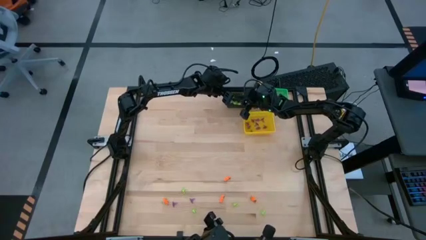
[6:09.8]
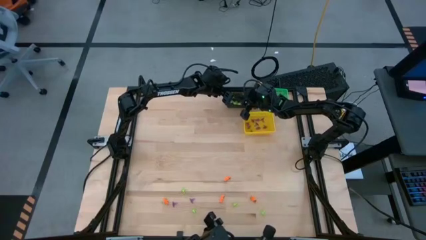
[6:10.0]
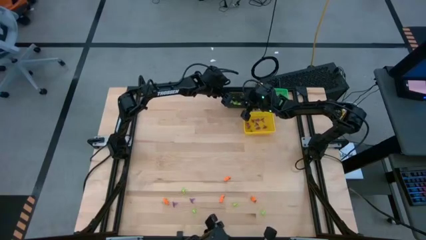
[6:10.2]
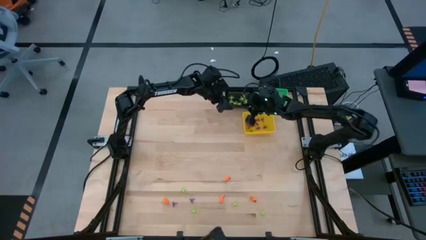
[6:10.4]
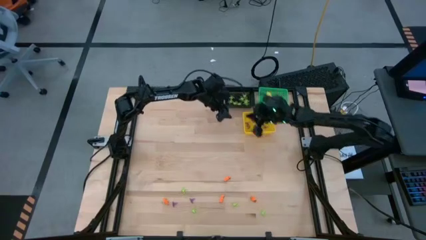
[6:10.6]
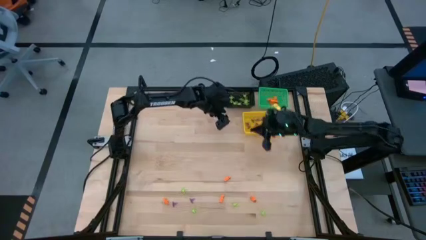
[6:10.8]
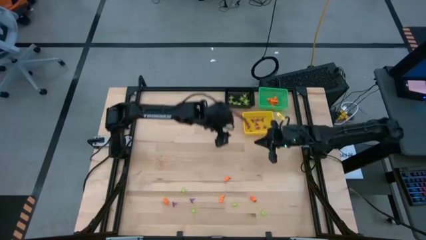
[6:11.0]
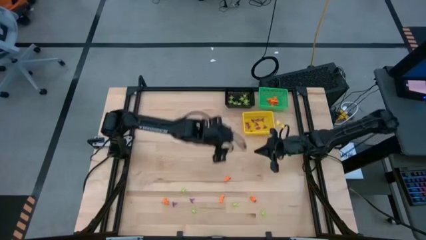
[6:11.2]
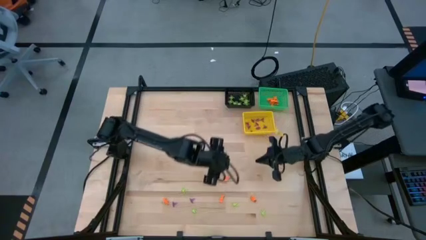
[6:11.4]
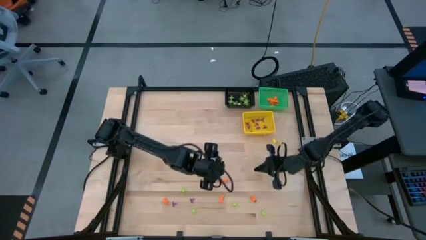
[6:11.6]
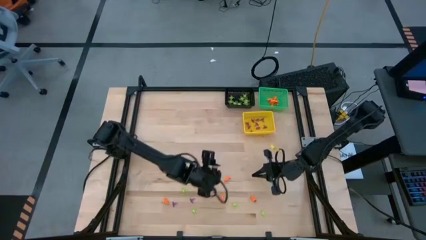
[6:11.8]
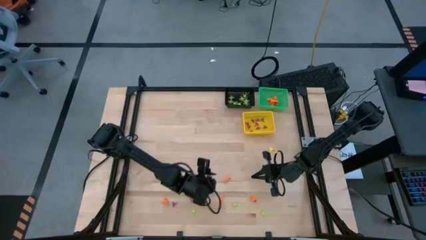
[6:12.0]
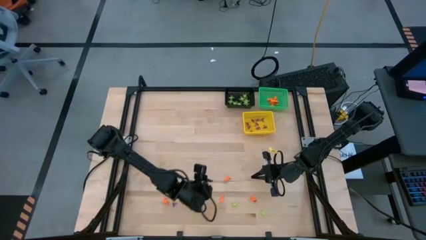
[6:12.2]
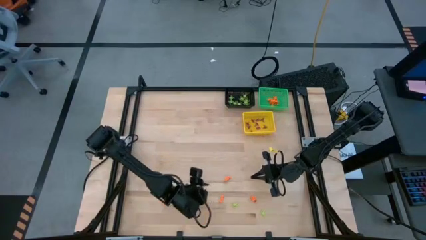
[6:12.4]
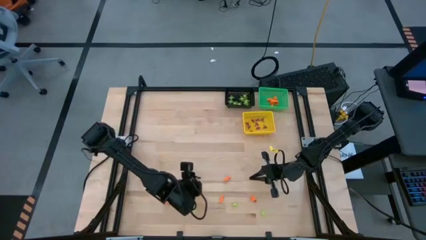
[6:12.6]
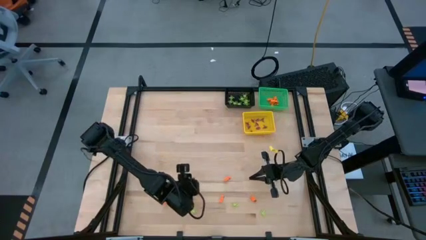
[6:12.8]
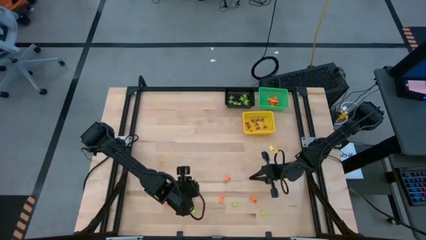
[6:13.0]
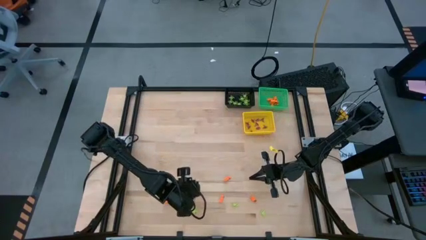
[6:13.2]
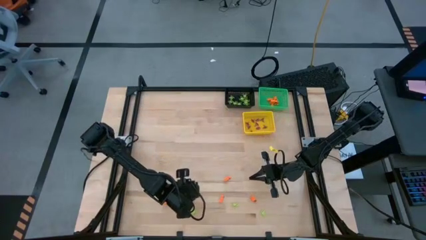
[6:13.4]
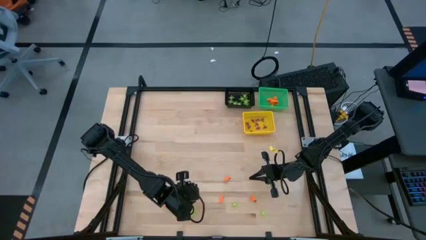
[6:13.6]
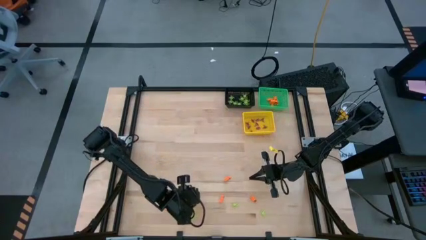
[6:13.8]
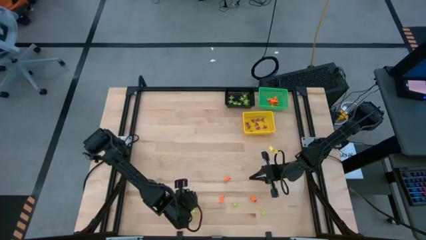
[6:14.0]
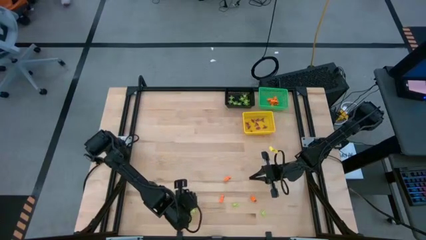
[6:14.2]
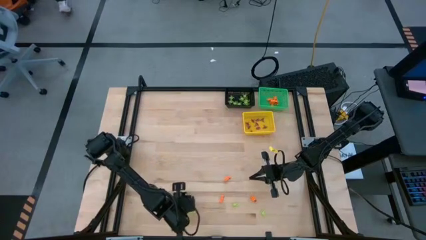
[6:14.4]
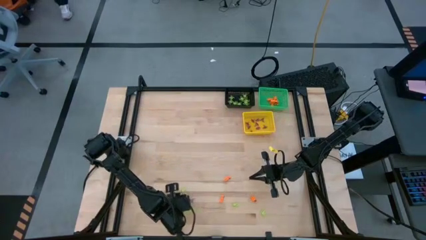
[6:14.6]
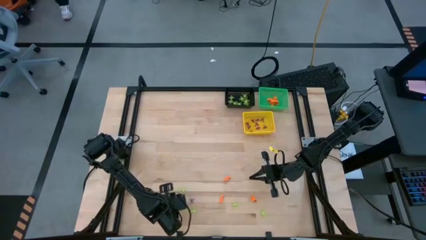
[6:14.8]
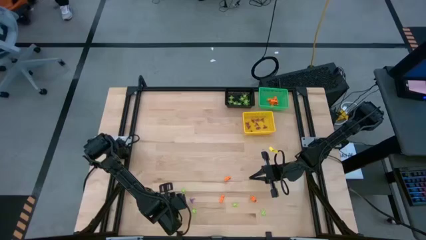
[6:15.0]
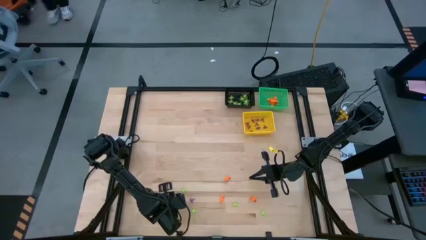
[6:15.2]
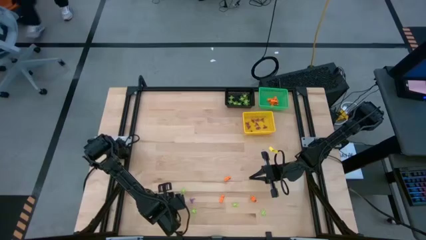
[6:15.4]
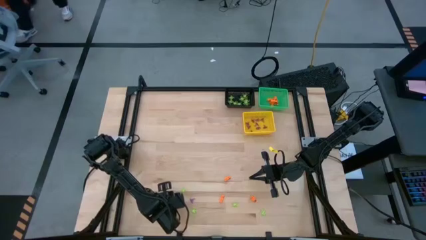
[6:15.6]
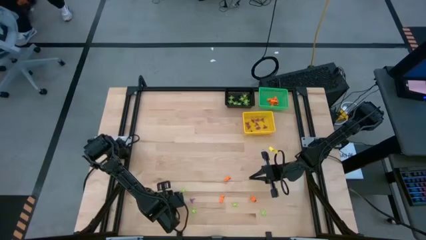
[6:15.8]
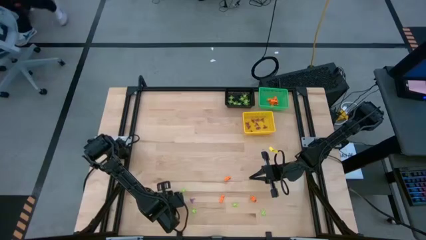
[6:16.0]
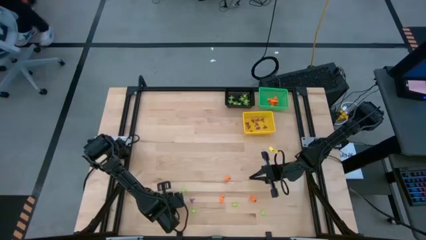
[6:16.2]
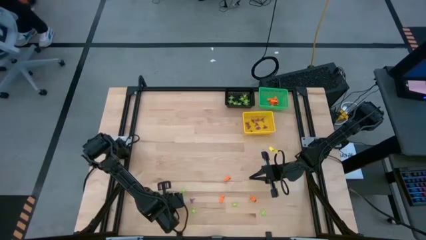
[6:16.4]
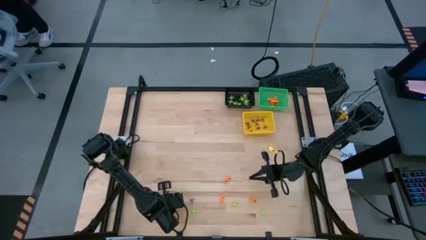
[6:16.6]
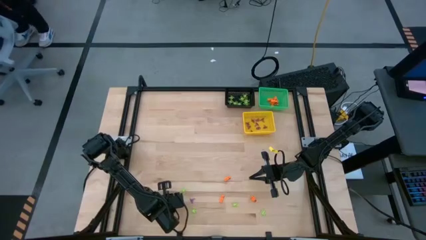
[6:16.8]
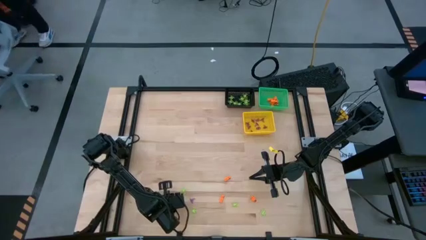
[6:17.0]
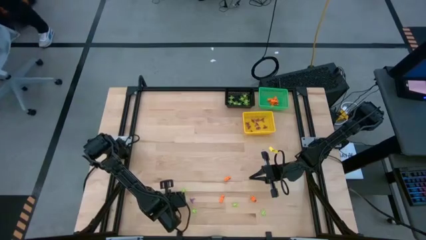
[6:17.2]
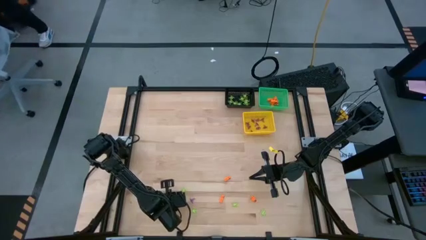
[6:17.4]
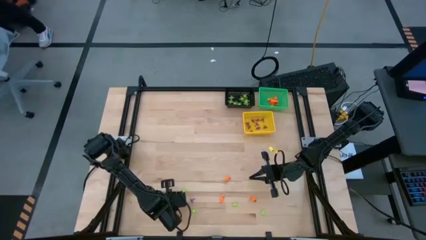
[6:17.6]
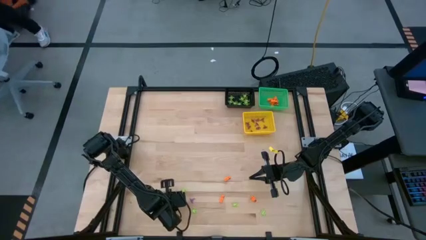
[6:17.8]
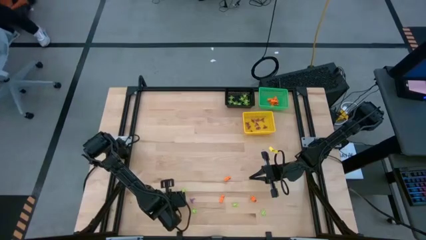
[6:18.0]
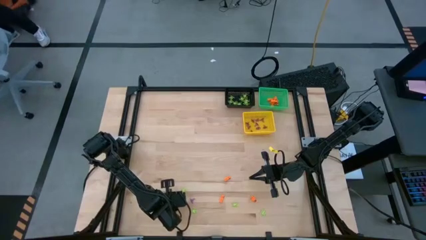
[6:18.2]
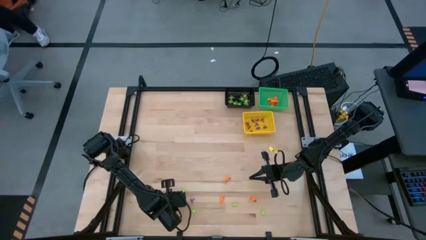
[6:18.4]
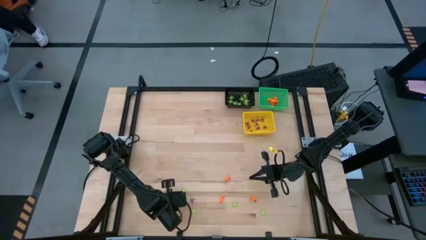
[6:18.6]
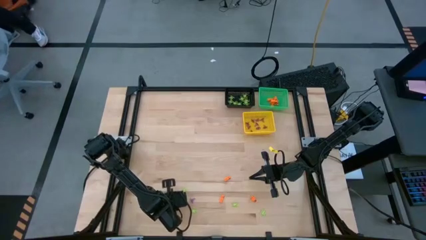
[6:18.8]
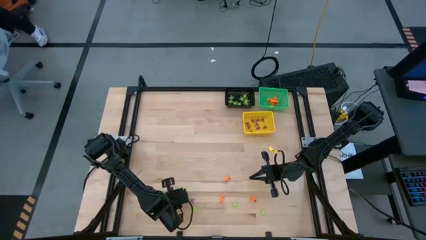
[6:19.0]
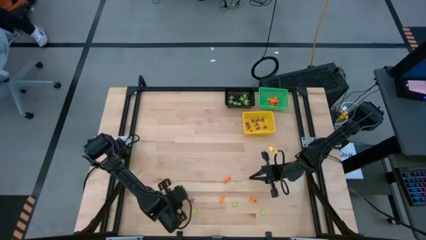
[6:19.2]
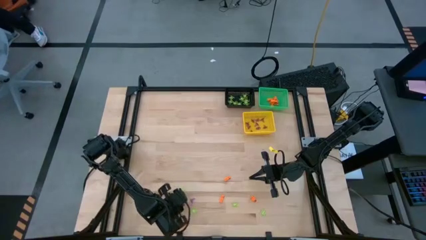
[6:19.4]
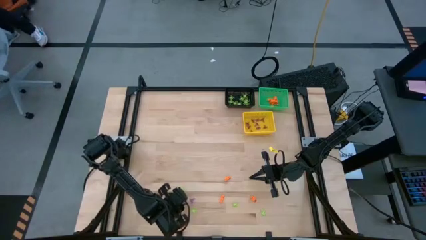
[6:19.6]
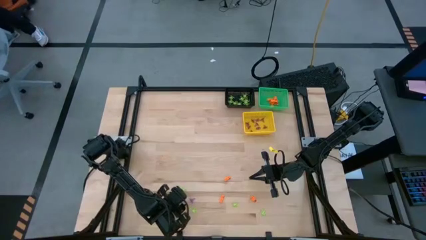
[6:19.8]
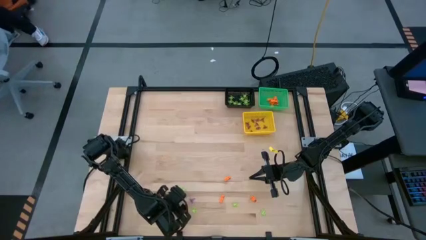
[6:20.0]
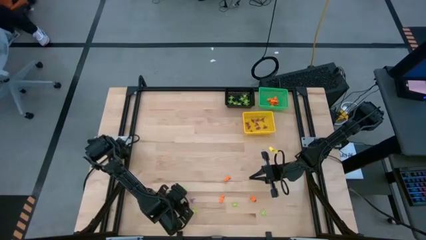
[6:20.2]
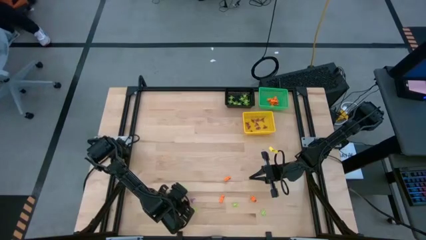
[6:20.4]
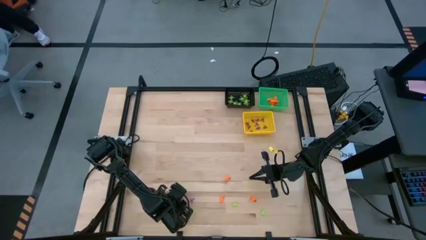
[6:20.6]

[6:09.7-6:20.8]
Task: Sort Halloween decoration
Put the violet witch hat toy into the yellow basket

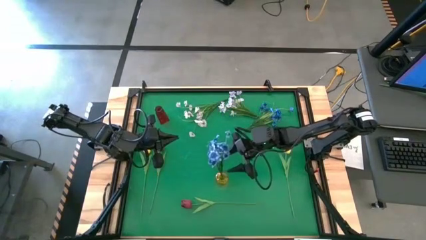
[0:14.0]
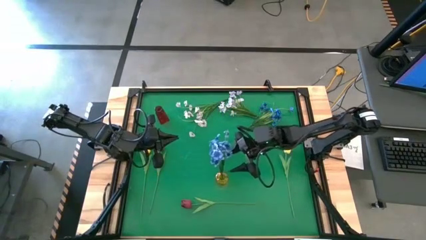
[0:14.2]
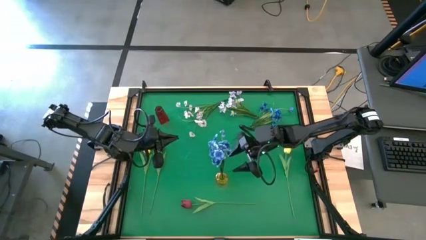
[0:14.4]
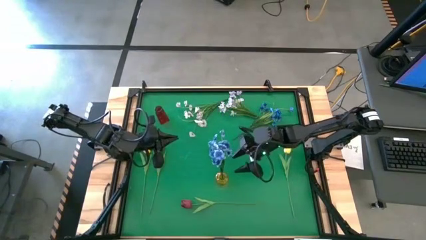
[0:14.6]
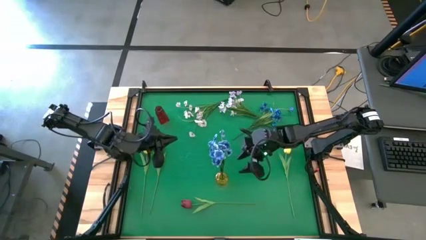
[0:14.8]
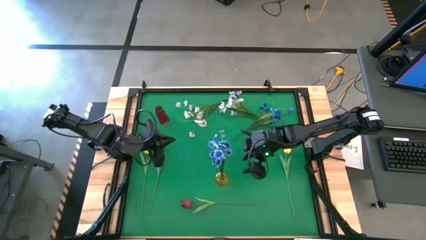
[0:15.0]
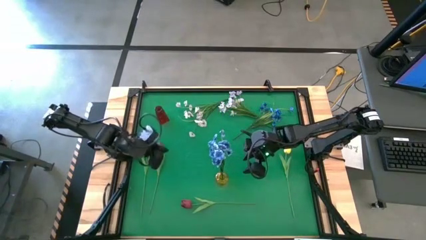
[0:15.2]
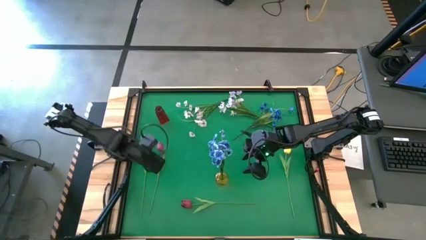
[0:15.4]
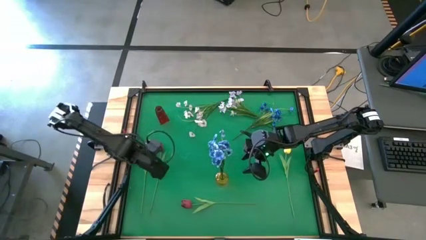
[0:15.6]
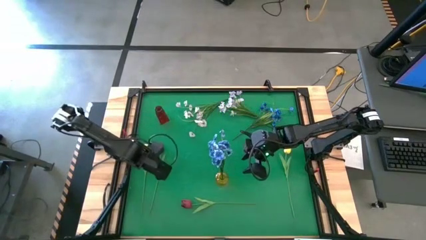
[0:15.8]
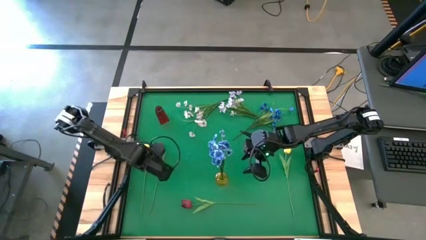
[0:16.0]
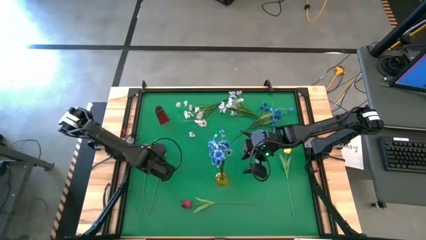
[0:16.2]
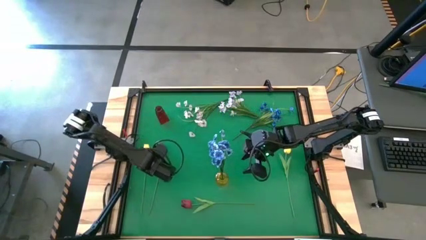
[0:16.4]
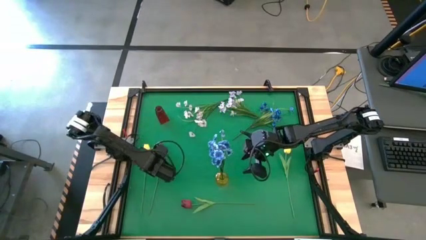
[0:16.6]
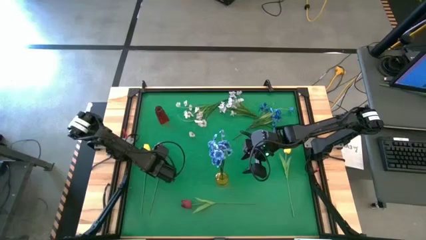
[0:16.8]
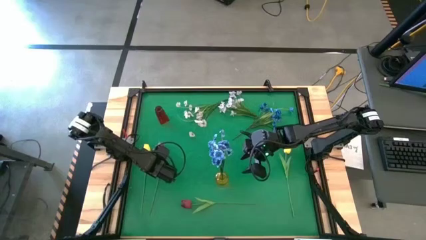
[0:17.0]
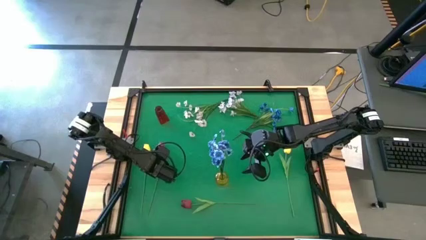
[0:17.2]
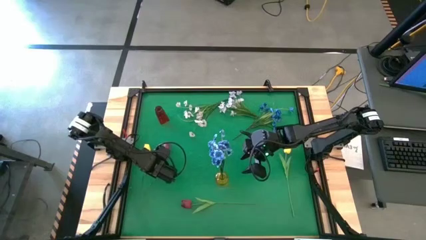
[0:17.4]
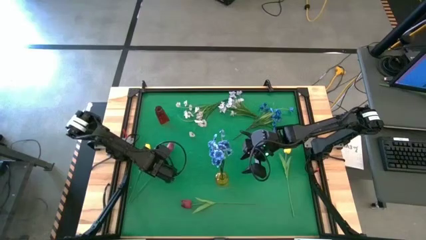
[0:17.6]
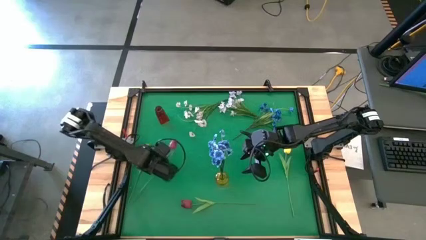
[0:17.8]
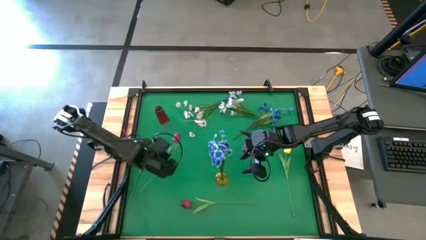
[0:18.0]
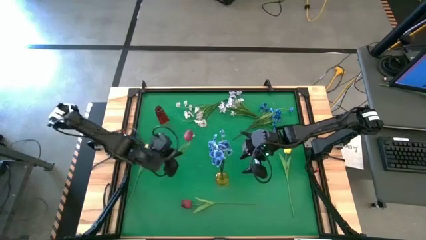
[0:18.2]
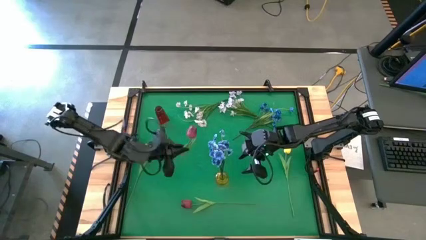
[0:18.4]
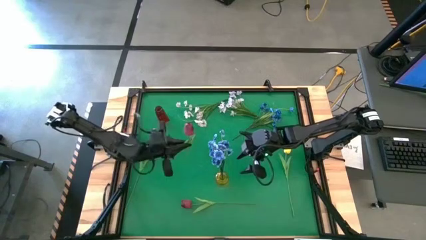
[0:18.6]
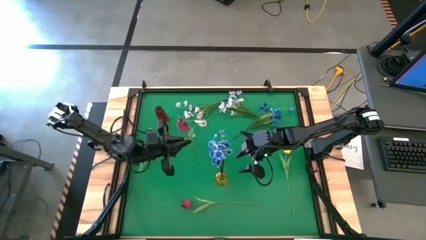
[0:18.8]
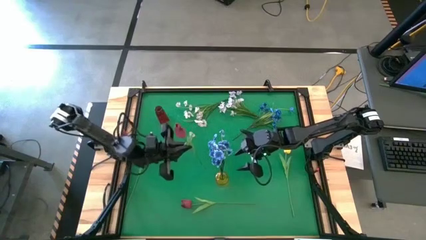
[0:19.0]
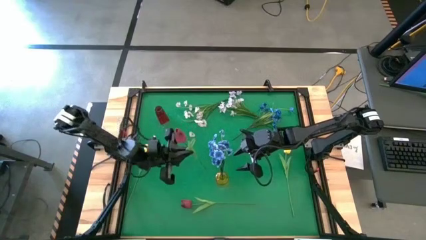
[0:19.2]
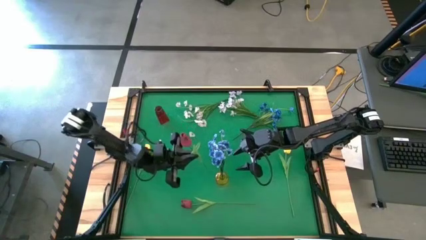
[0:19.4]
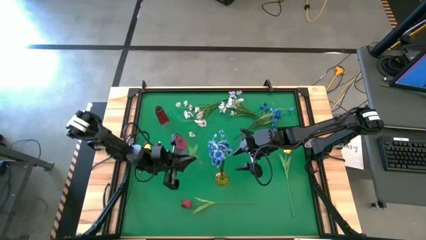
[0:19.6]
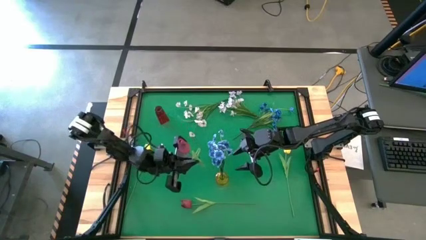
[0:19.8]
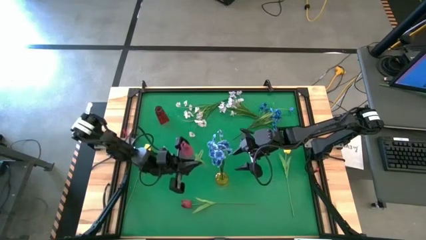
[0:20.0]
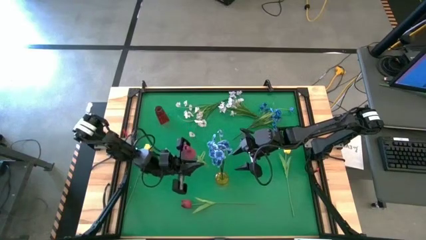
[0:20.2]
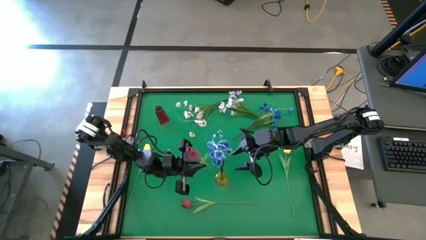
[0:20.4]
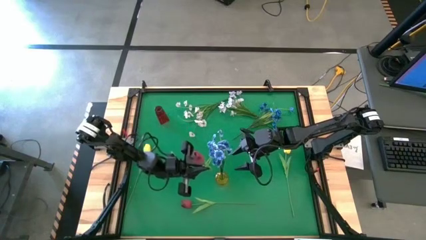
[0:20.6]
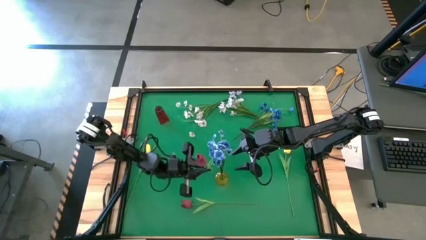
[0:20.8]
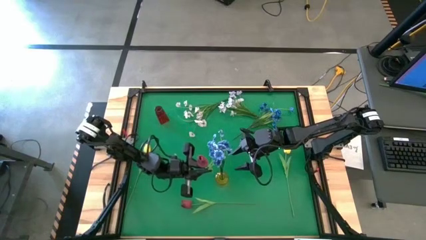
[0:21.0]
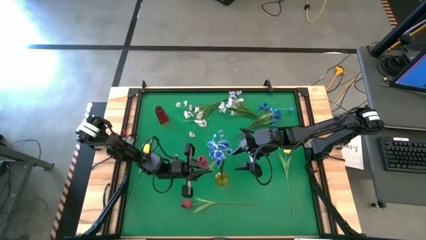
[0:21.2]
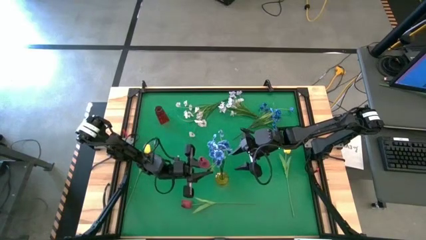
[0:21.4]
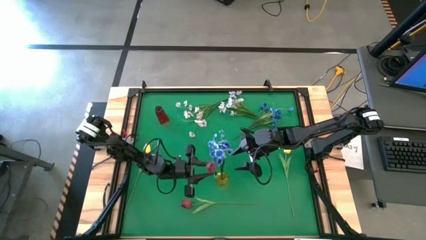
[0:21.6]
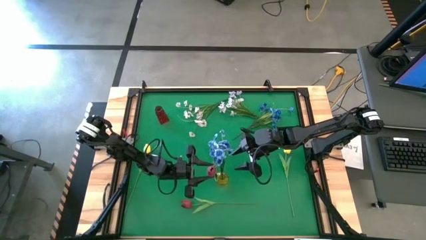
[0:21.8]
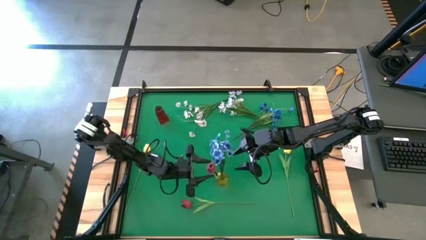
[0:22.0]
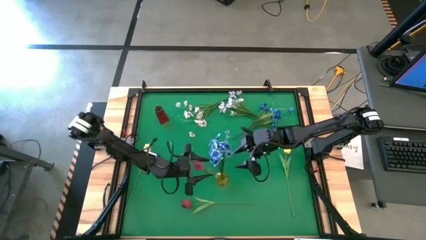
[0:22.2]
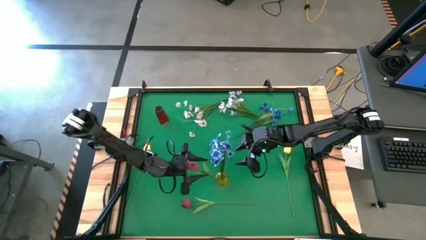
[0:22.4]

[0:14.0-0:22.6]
Task: Sort flowers into vase by color
Put the top red flower into the yellow vase
